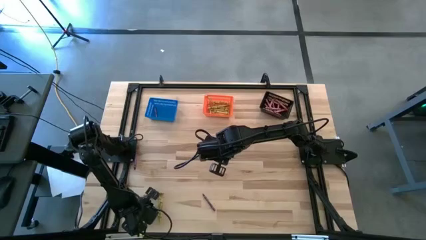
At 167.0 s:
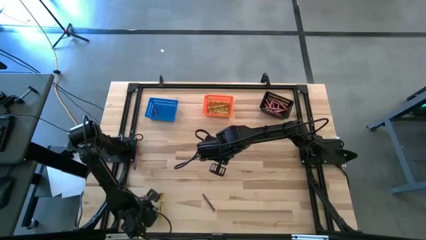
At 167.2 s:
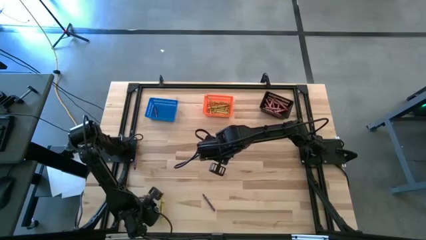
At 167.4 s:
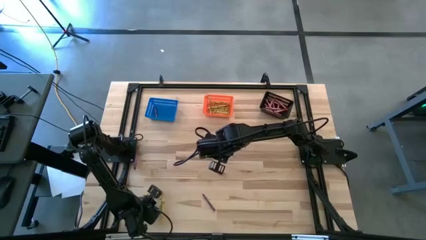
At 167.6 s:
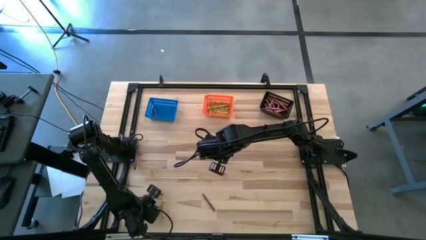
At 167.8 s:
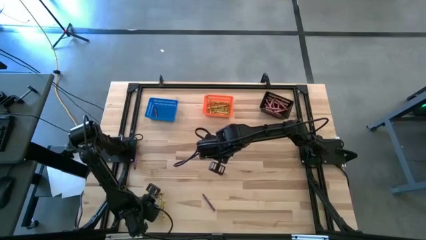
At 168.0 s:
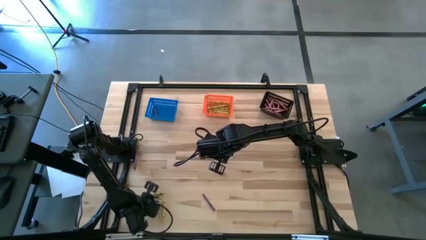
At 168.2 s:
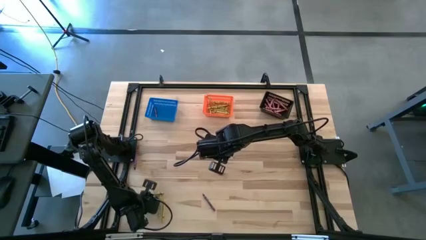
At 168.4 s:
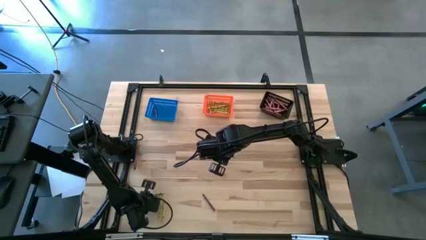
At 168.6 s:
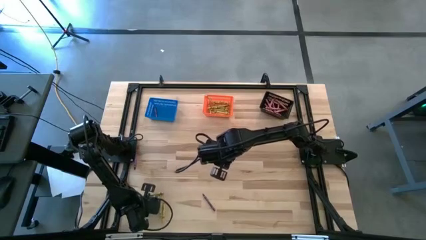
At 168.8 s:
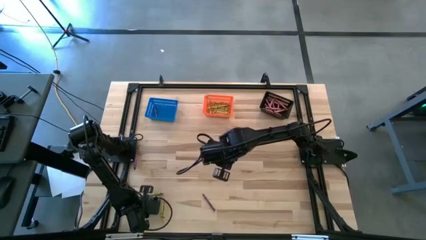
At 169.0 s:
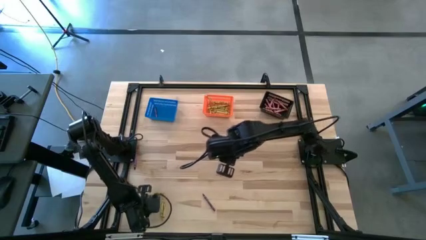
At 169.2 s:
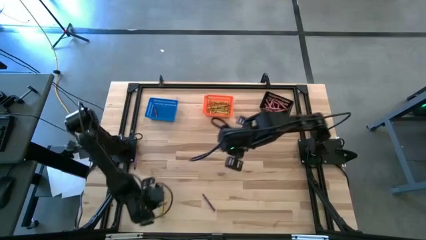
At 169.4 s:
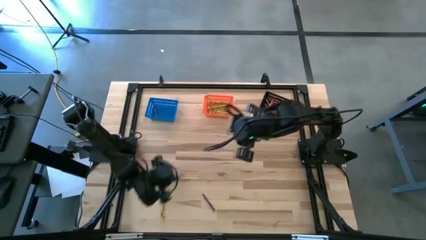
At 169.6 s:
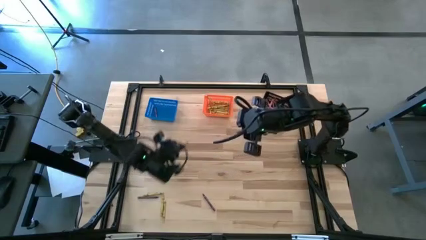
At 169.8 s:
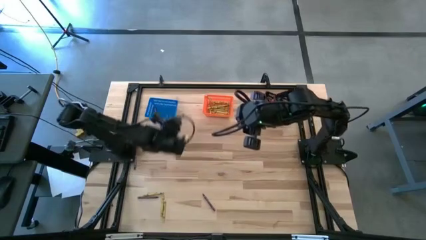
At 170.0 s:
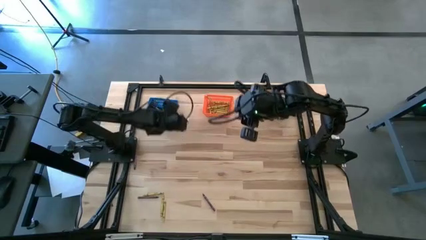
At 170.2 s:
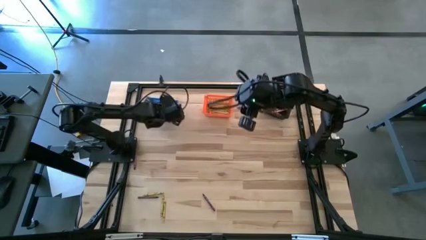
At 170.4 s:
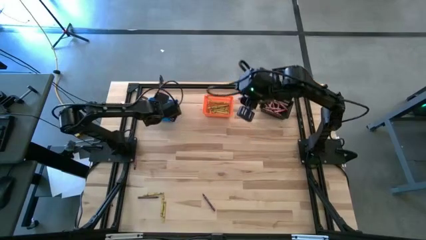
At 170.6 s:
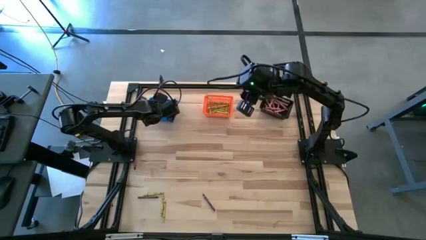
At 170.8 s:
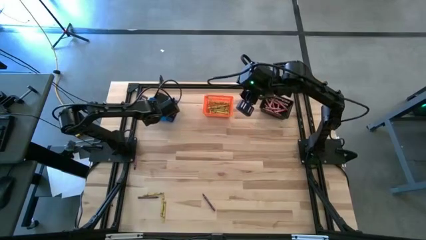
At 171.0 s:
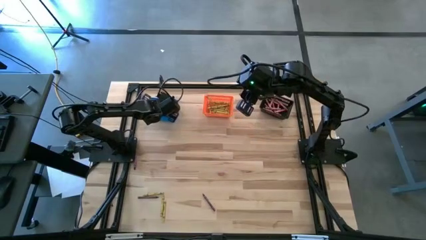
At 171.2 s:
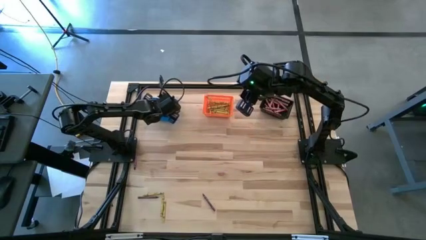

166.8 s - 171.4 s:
Task: Sort crayons
Put the violet crayon into the blue bin

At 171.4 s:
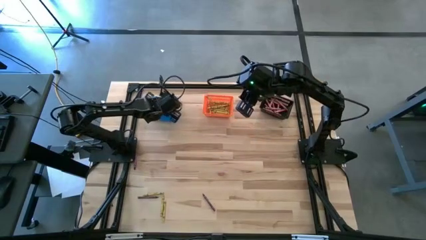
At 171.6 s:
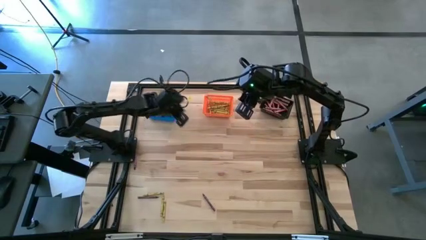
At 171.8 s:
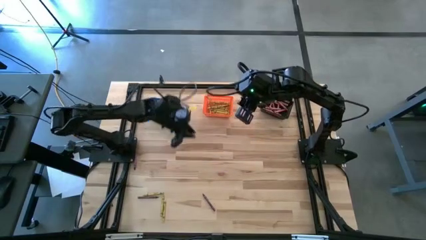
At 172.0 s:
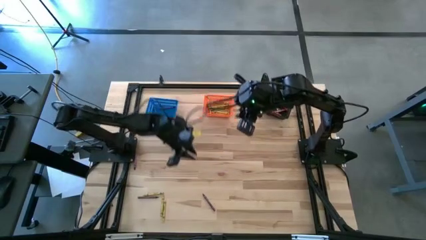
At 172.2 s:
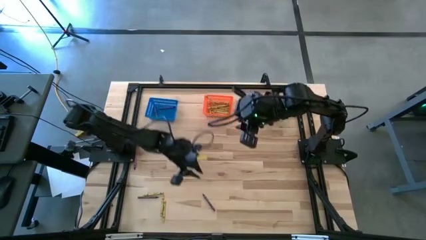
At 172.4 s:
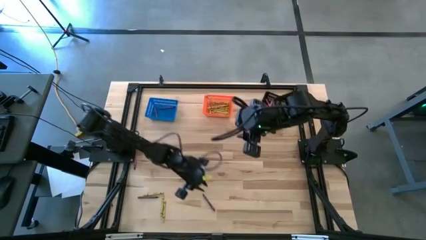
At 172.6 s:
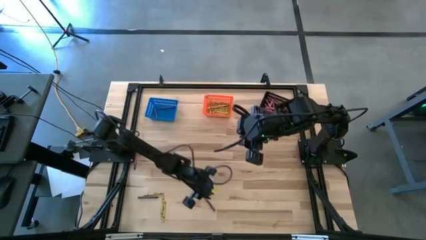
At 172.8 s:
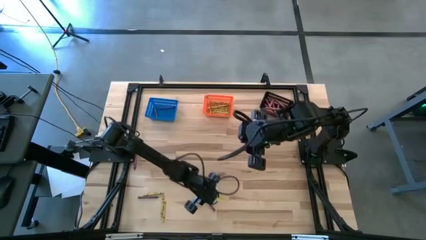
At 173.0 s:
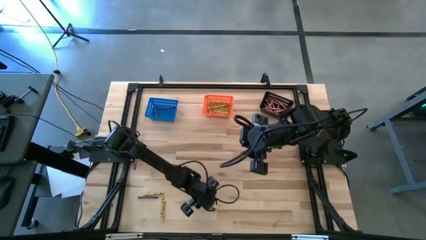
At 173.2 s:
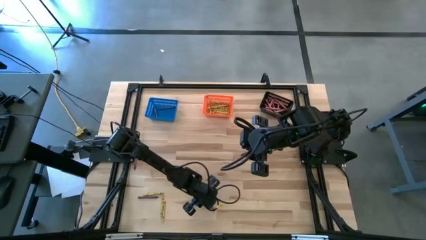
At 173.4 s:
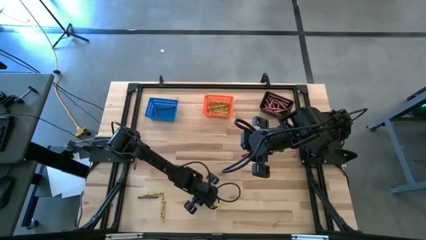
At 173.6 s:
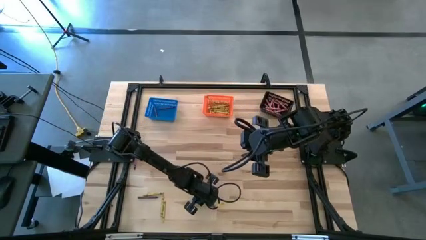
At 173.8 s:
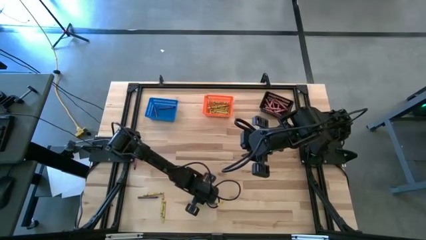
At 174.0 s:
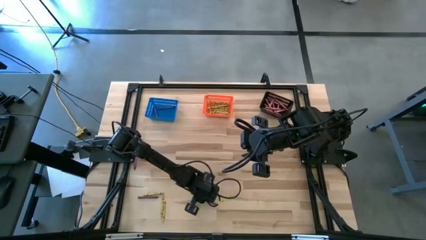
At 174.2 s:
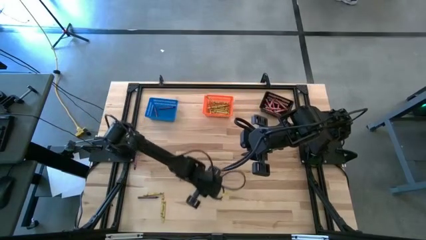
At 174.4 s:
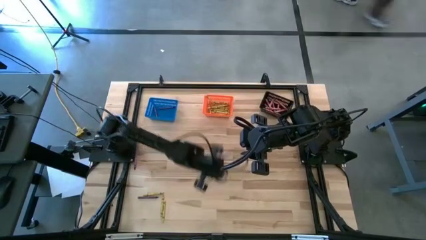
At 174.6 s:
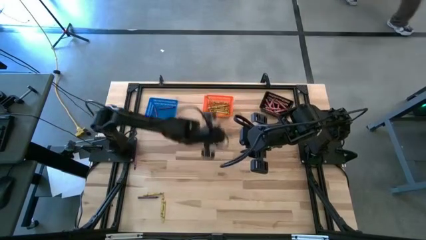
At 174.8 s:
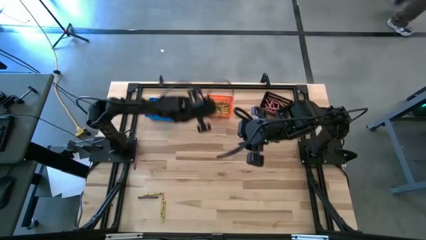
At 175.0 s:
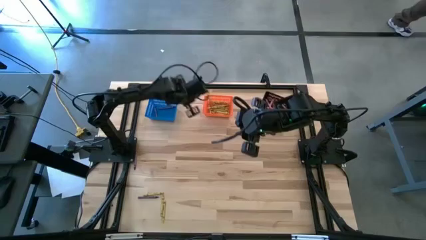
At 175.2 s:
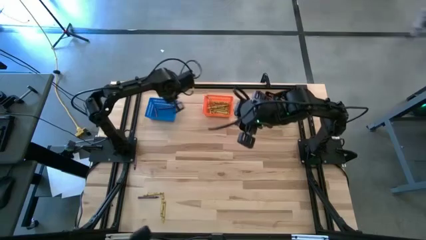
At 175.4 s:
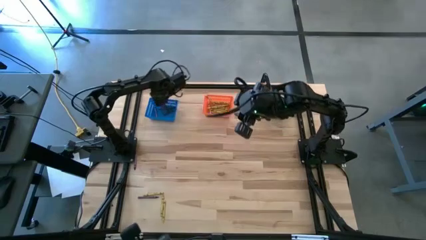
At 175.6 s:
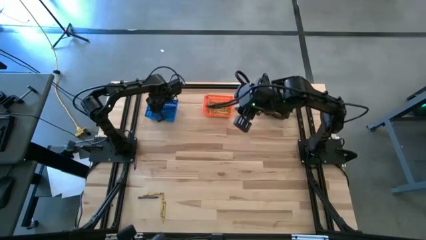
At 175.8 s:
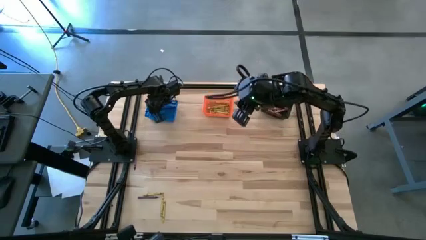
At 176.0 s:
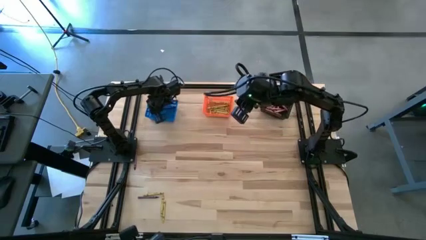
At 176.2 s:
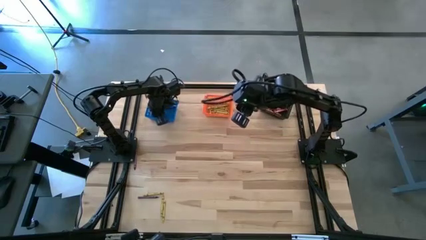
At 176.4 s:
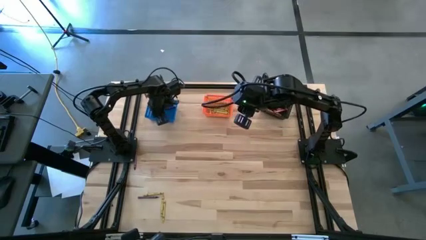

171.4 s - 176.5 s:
Put the right violet crayon into the blue bin

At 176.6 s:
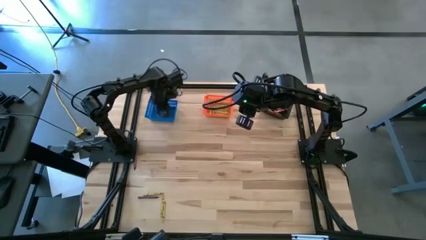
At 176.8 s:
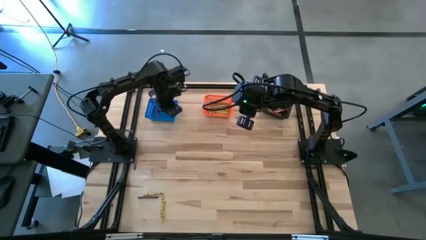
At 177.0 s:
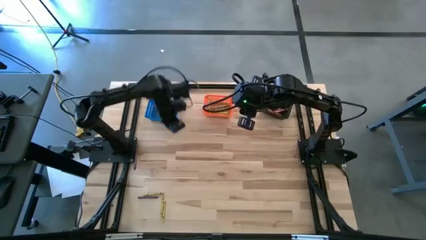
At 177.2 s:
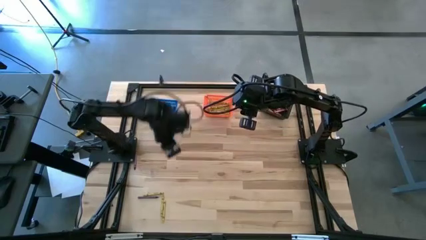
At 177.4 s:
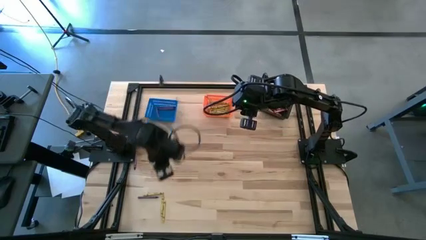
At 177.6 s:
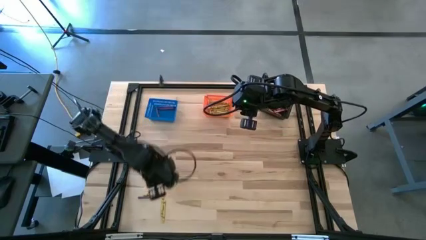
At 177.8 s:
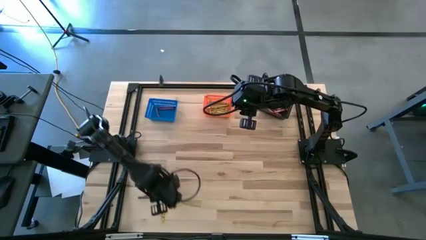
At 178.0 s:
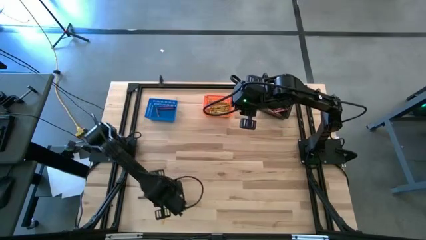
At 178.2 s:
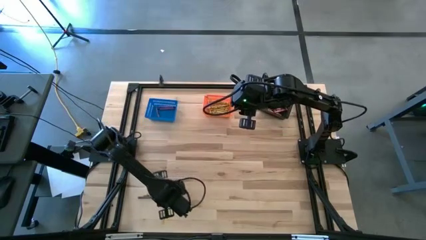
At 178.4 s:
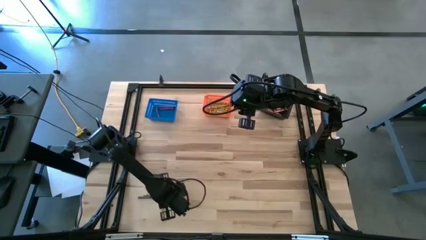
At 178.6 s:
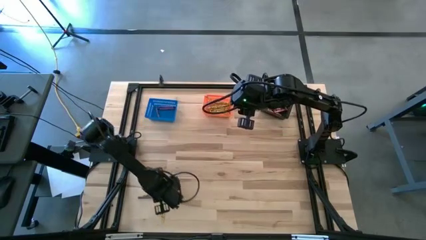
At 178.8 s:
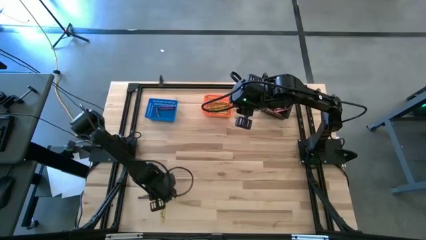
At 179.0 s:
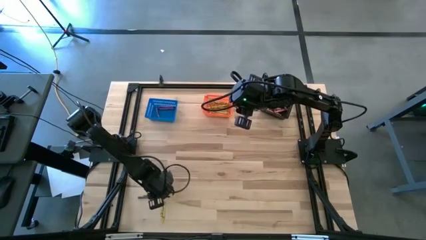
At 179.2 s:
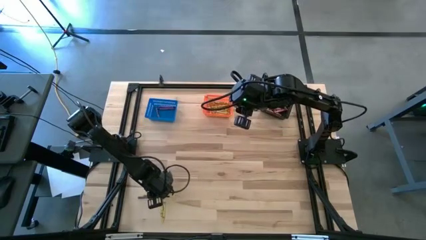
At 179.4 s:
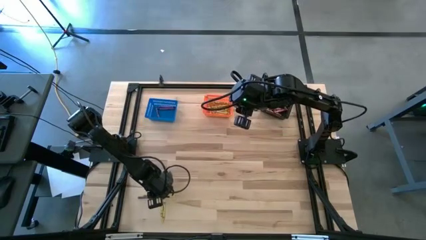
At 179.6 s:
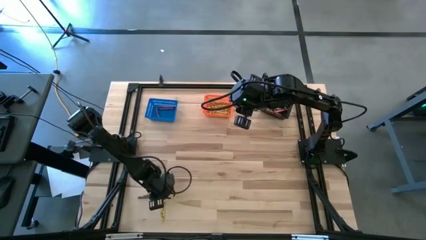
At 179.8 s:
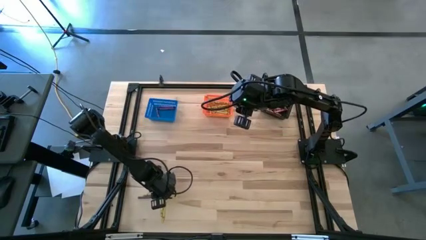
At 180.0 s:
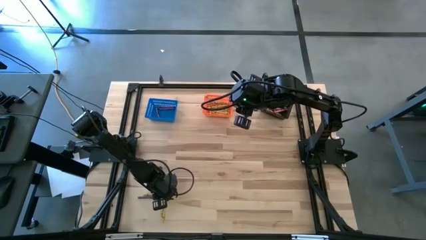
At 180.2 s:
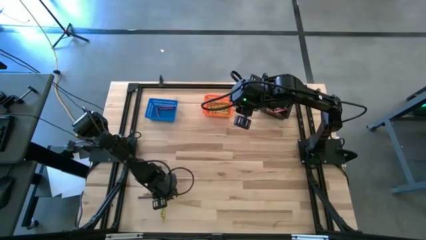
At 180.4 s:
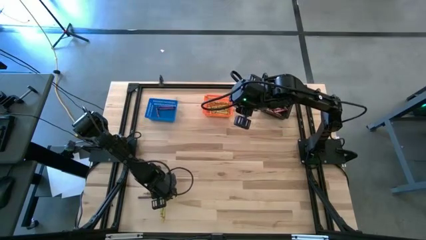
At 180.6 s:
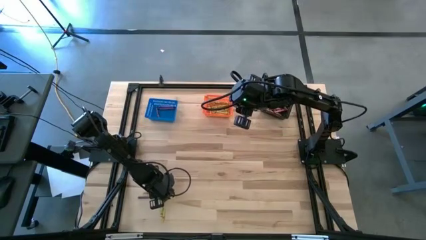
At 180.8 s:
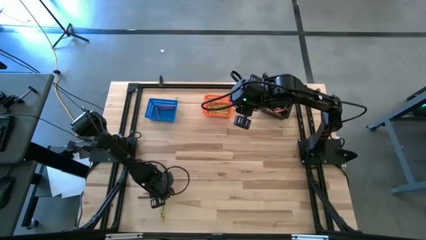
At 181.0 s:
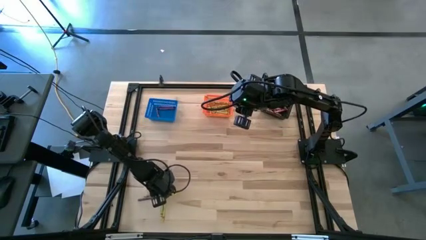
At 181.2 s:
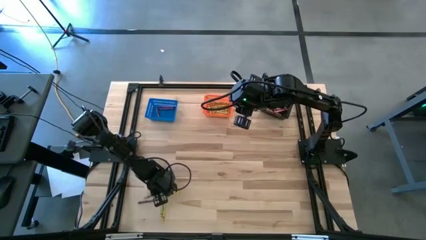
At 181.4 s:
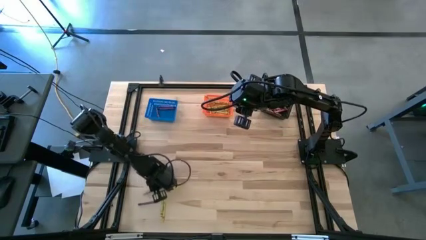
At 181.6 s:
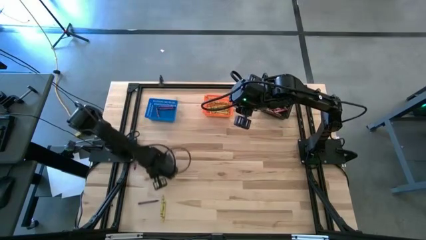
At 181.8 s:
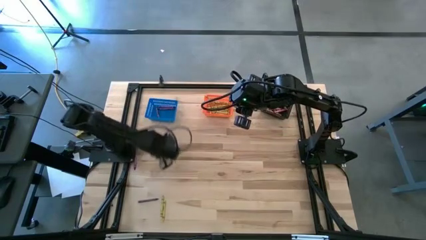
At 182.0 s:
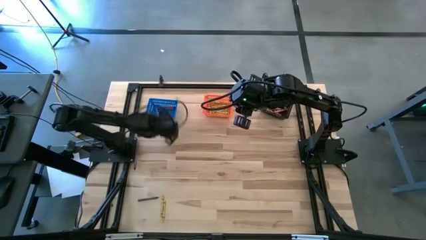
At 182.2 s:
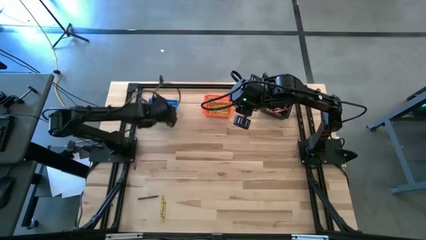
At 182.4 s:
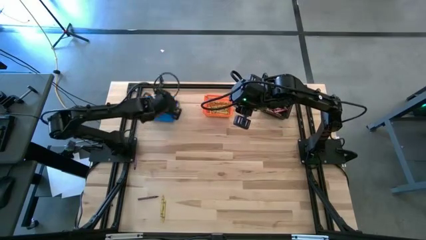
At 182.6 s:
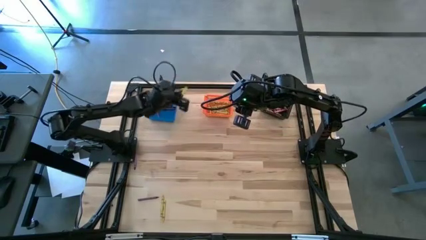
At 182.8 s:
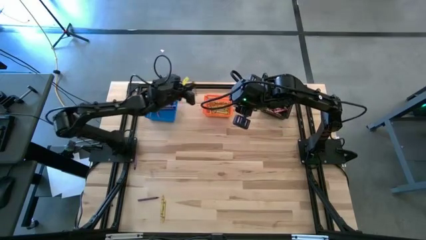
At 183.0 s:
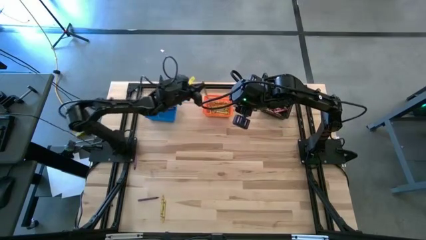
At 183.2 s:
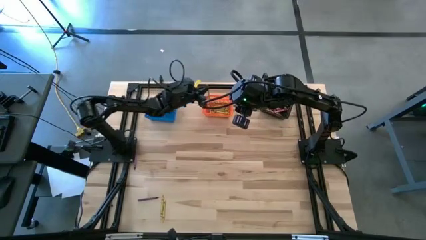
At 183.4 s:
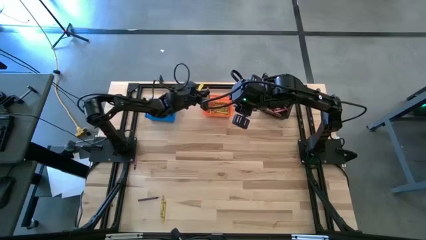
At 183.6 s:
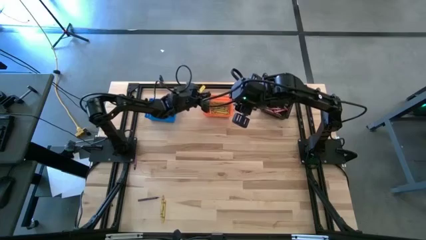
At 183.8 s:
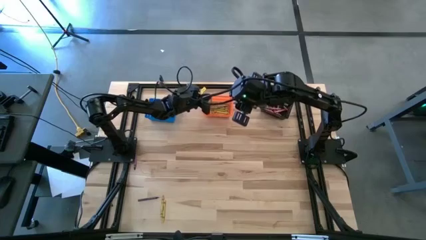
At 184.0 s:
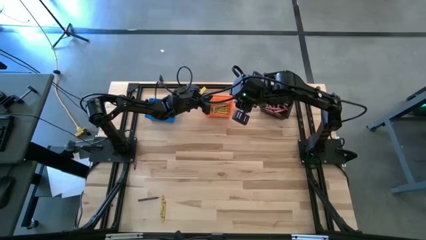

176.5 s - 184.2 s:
Put the top yellow crayon into the orange bin
